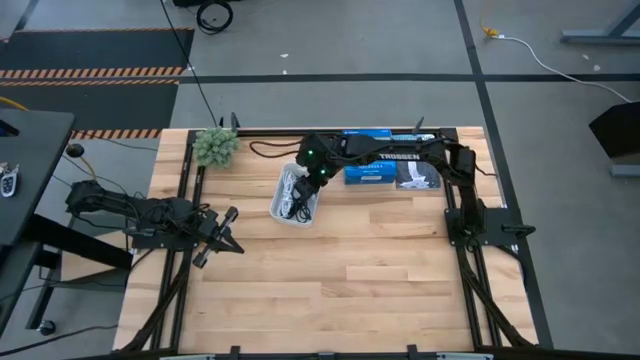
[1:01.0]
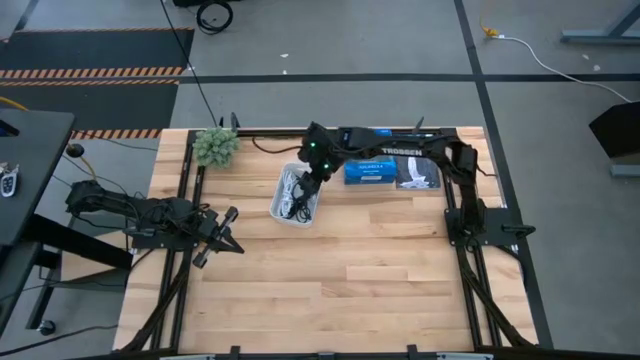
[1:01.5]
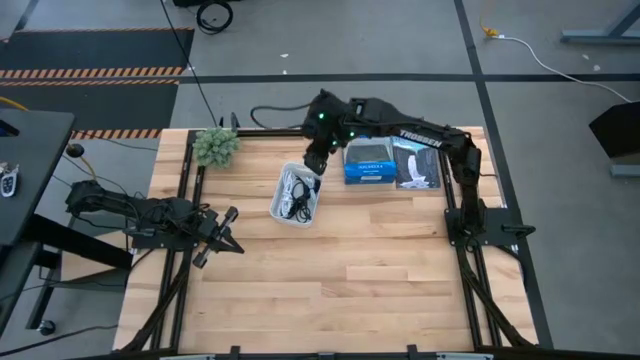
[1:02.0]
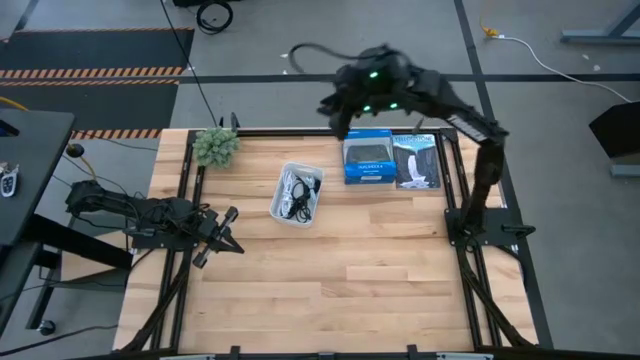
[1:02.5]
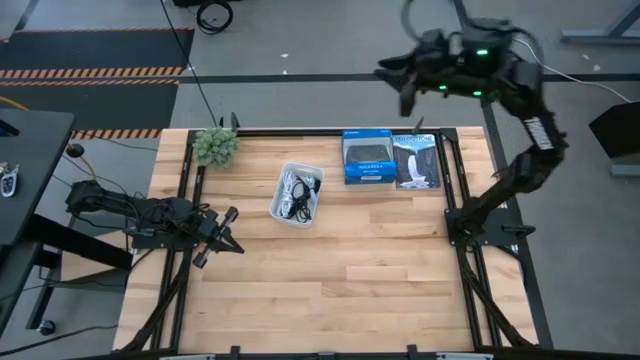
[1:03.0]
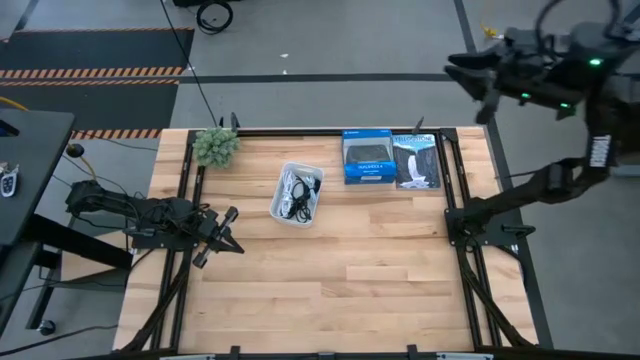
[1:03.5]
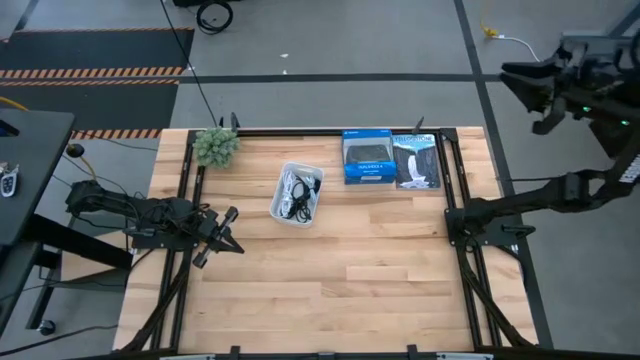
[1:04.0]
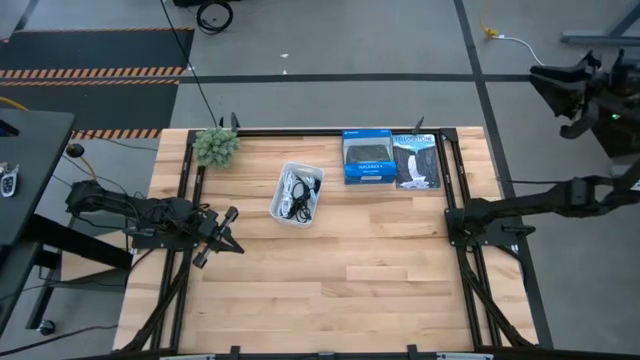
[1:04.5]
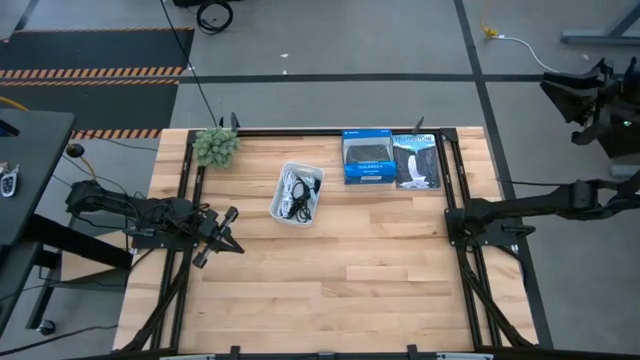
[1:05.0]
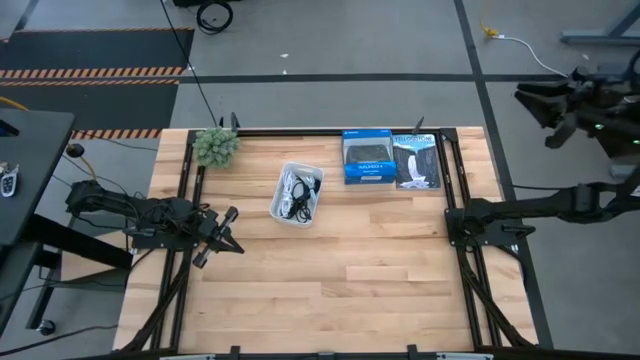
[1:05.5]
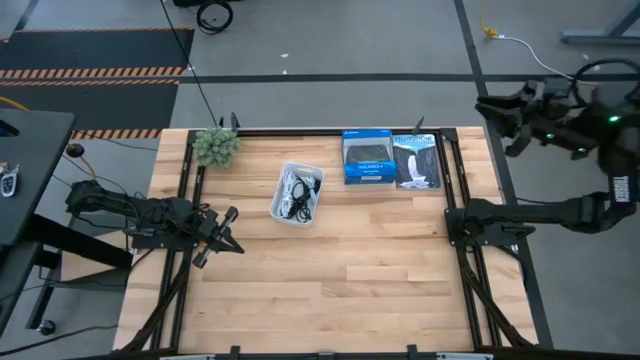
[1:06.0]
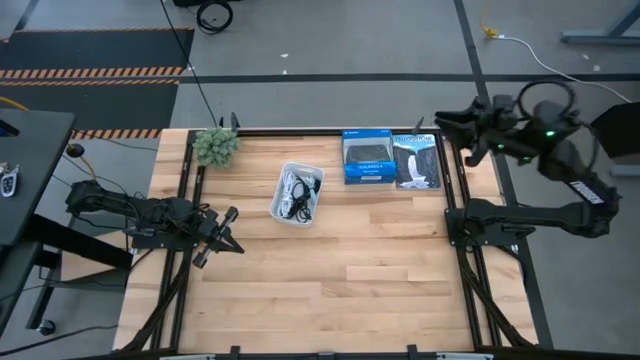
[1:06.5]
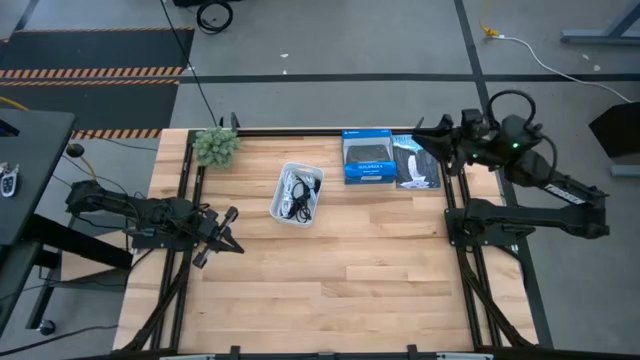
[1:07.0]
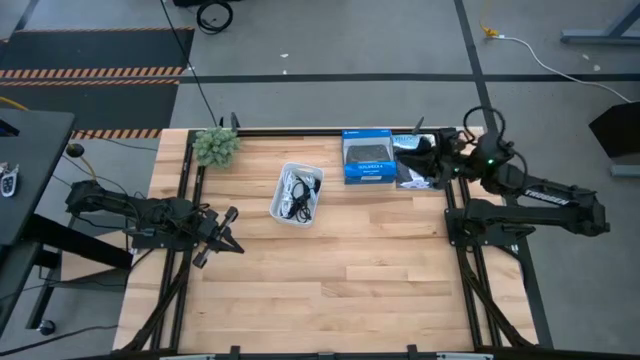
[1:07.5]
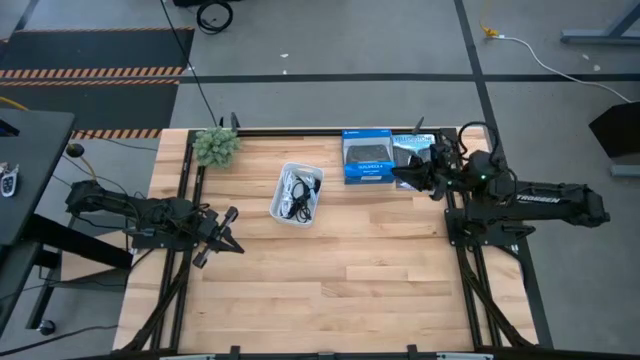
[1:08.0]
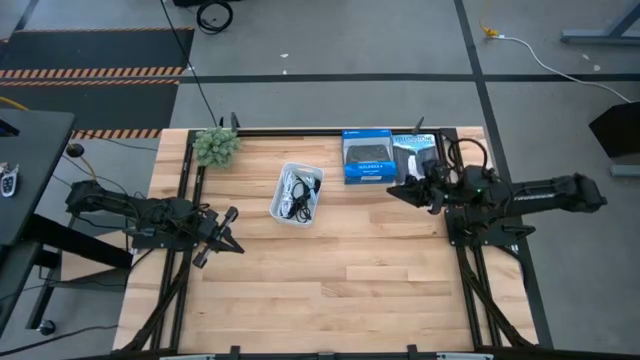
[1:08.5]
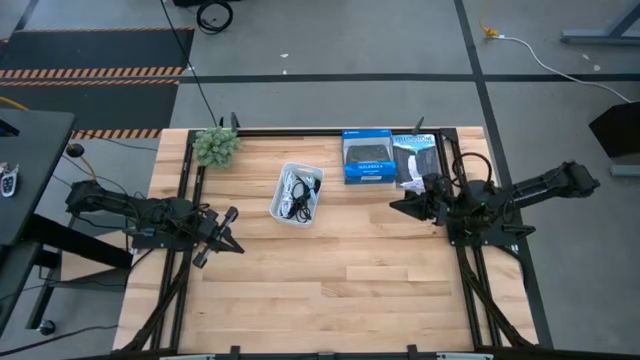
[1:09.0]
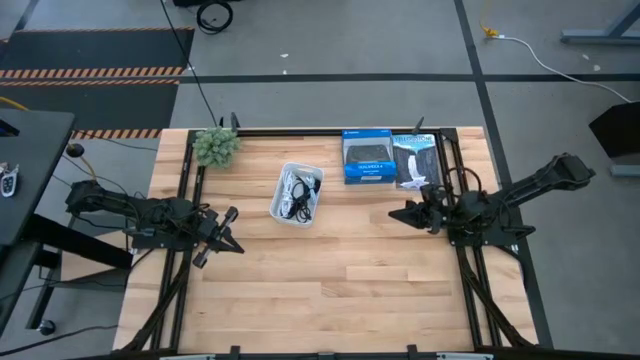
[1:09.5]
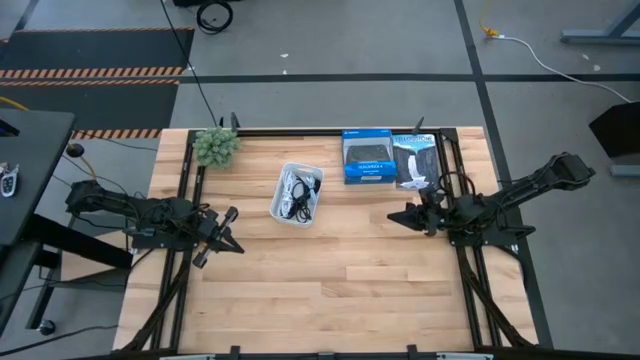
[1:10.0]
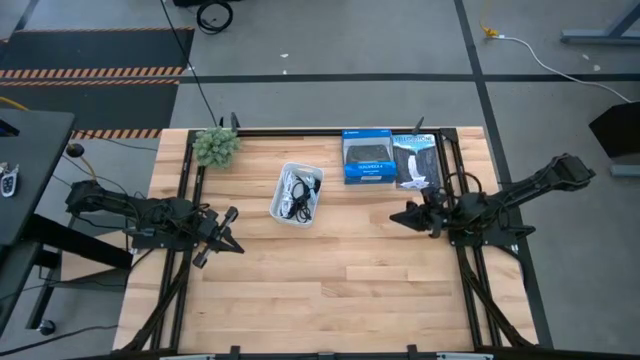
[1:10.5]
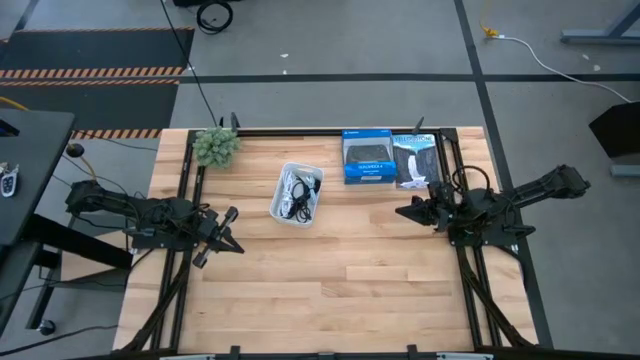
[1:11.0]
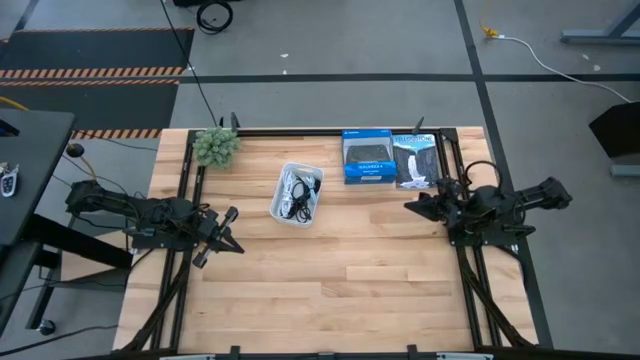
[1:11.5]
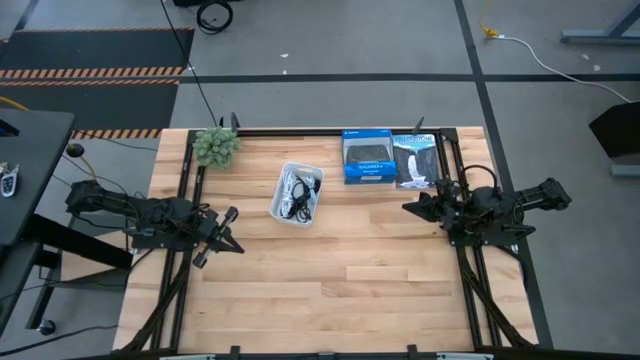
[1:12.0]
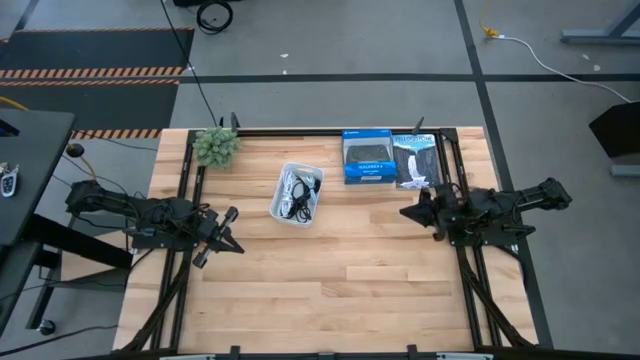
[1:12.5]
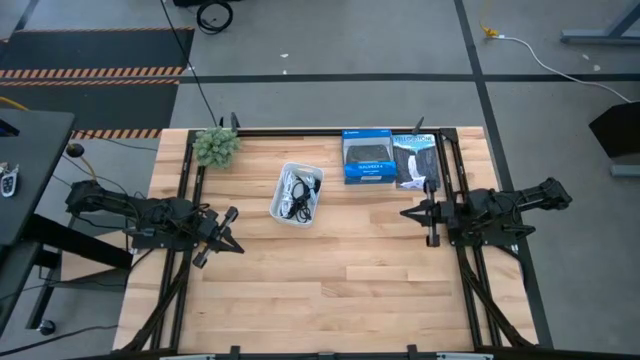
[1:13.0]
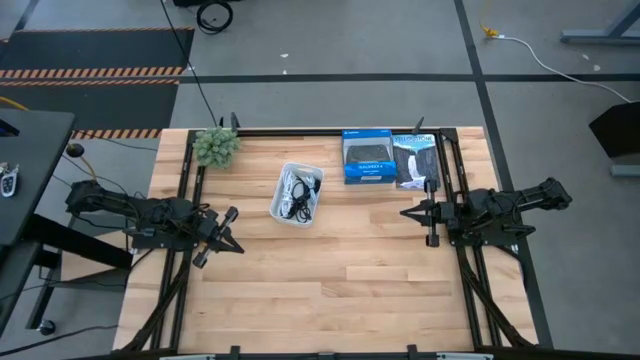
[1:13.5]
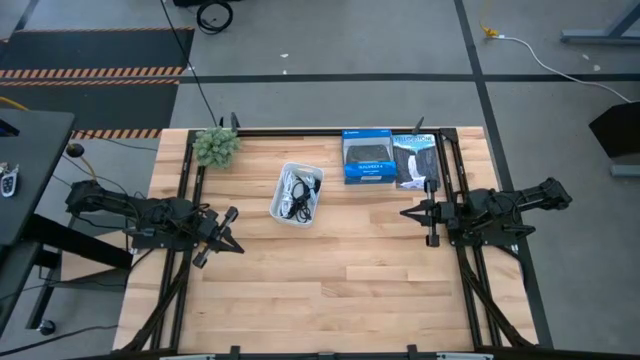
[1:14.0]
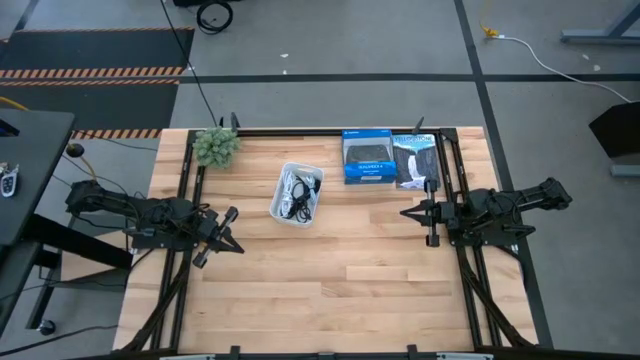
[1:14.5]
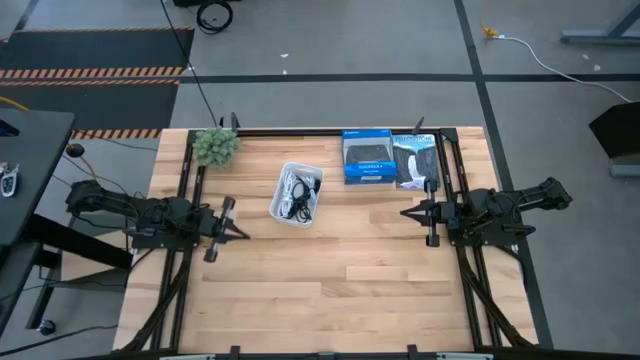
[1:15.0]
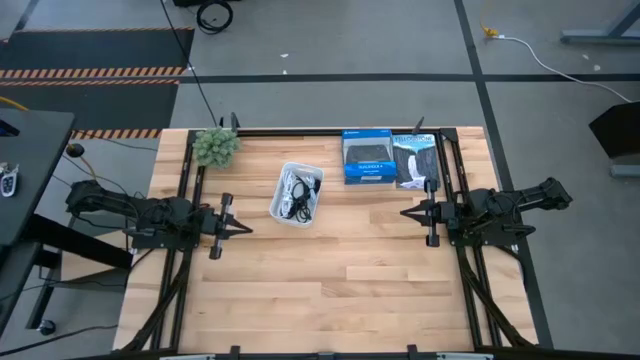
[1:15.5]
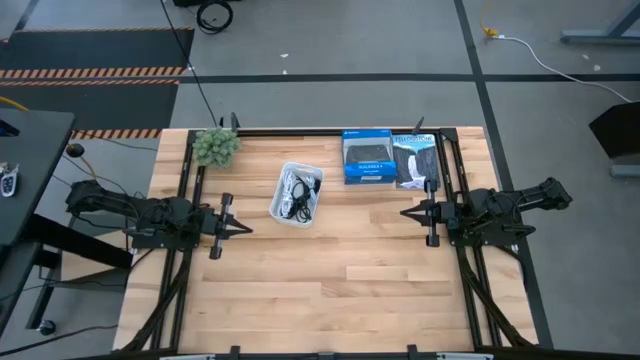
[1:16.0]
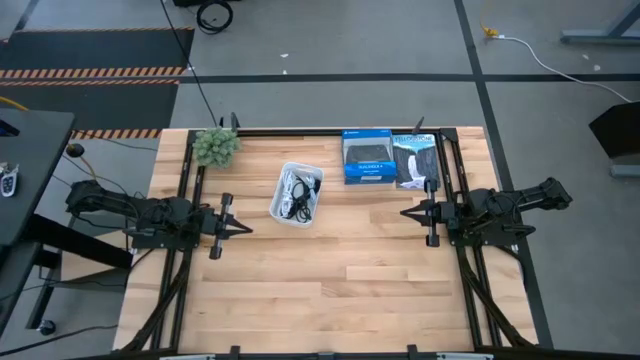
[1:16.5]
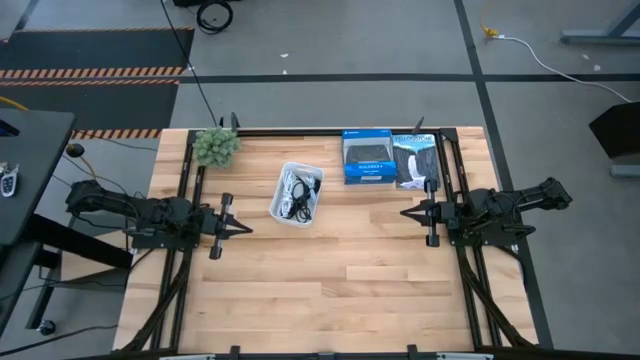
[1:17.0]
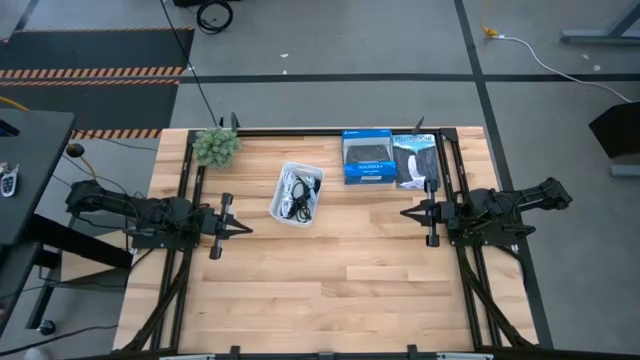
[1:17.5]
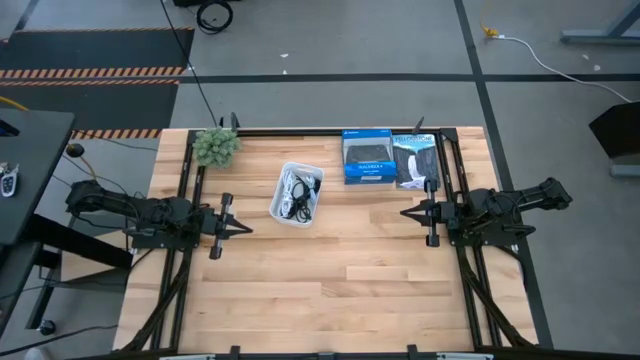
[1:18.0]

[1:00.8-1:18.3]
Task: Pick and place USB-C Cables
Return to Home Position

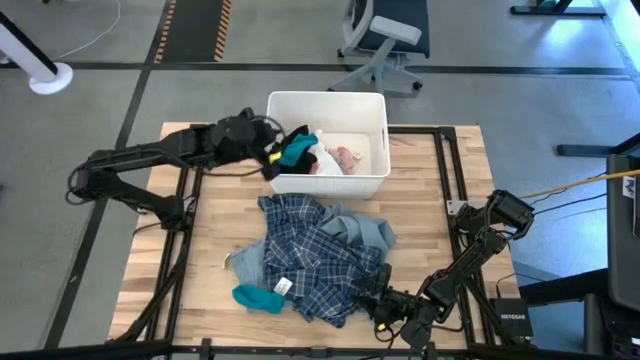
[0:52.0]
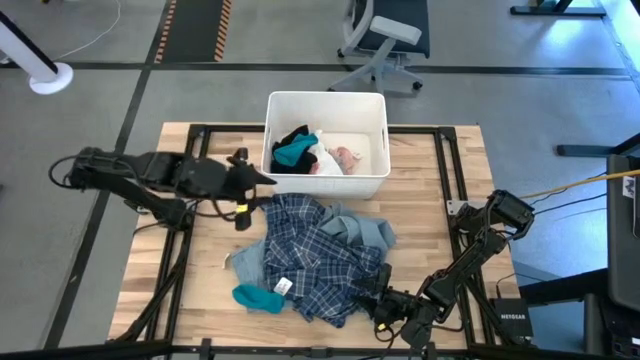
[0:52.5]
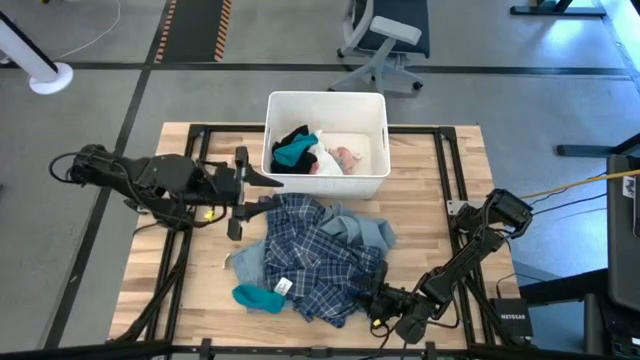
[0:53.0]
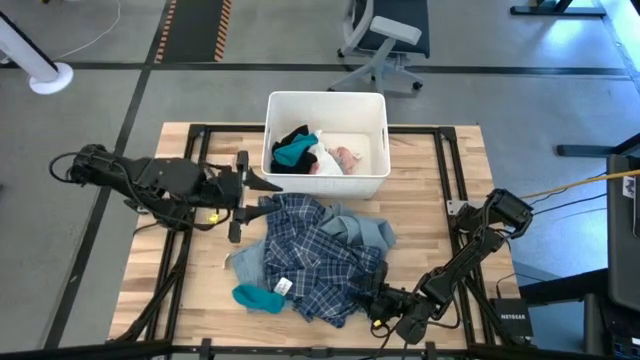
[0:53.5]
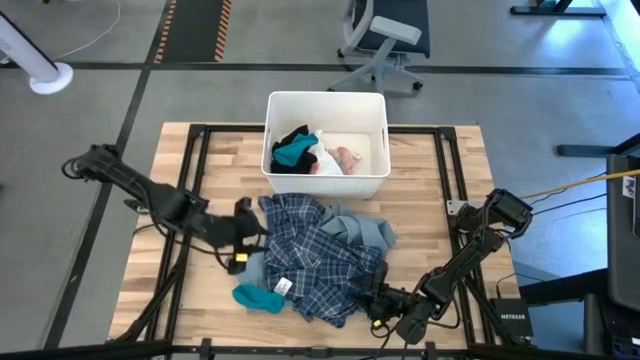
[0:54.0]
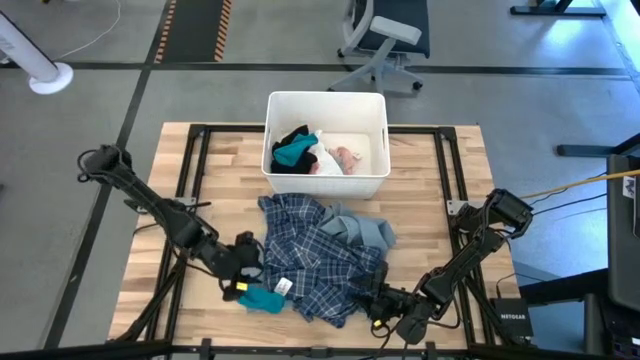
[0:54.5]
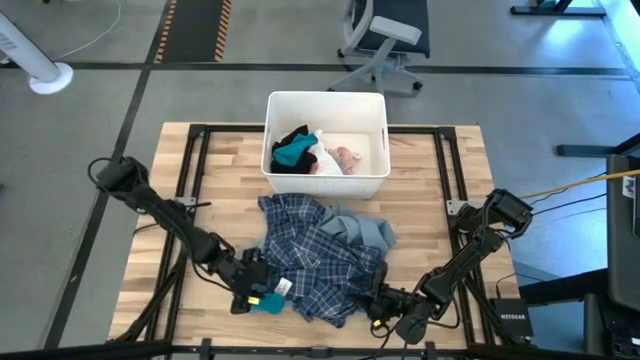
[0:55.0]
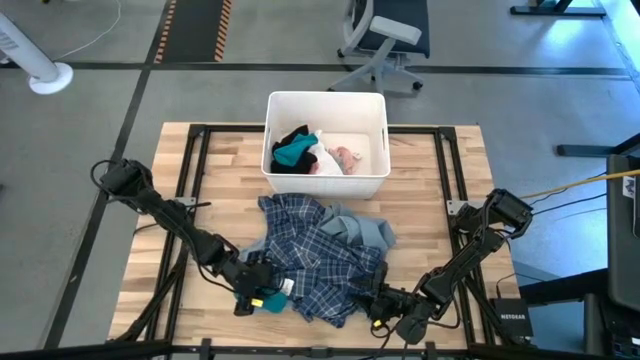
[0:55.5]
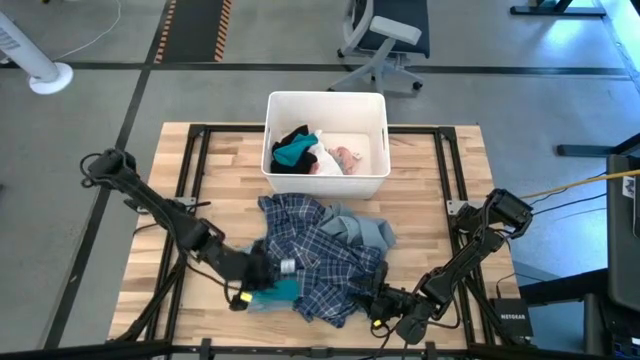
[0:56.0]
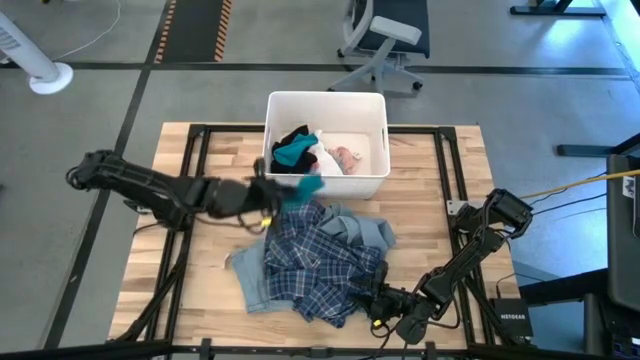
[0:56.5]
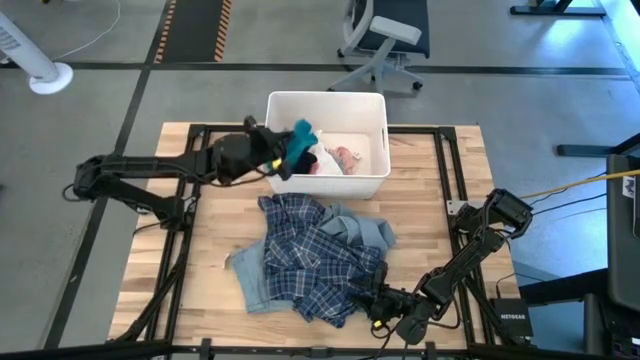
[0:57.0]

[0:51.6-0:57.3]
Task: Sort clothes
Put the blue sock into the
